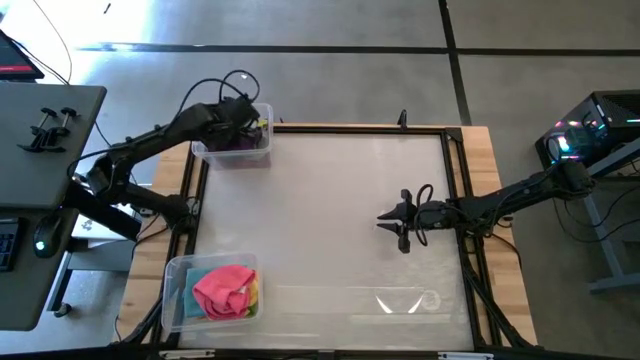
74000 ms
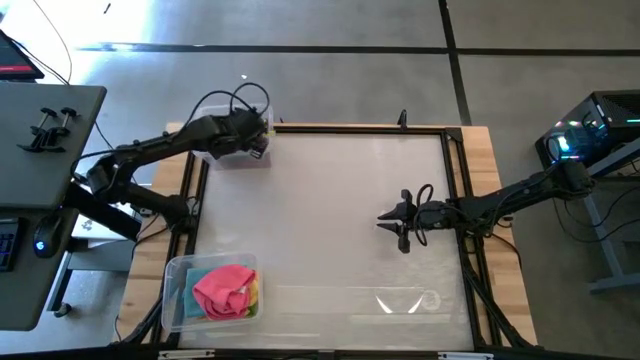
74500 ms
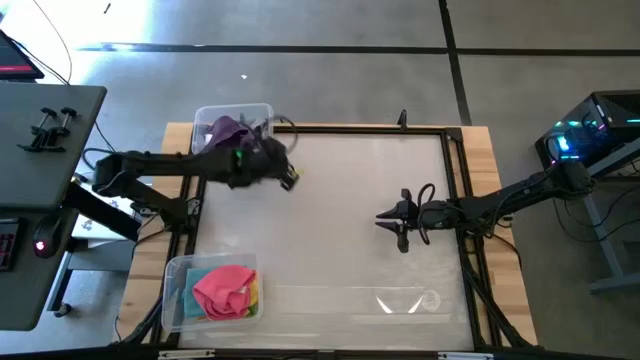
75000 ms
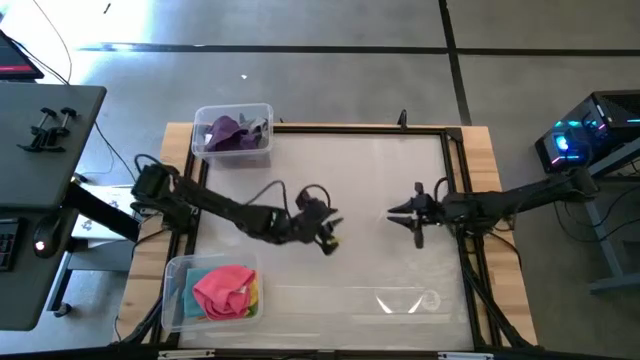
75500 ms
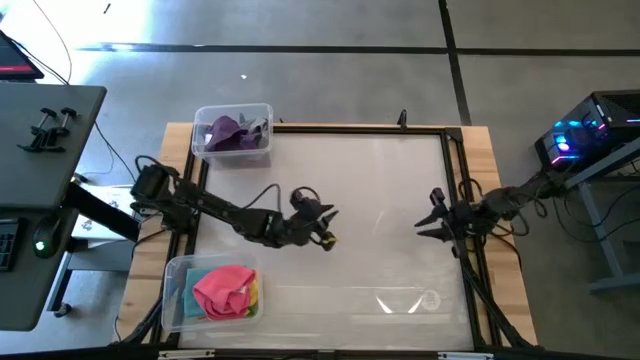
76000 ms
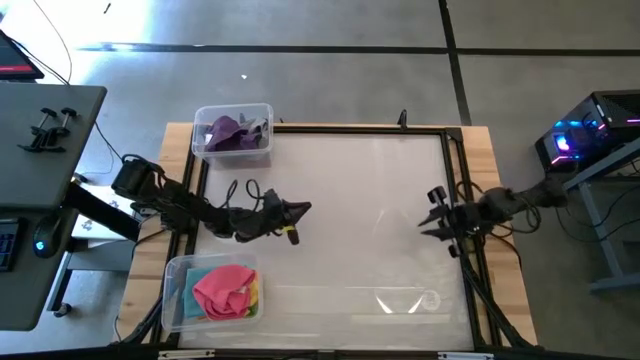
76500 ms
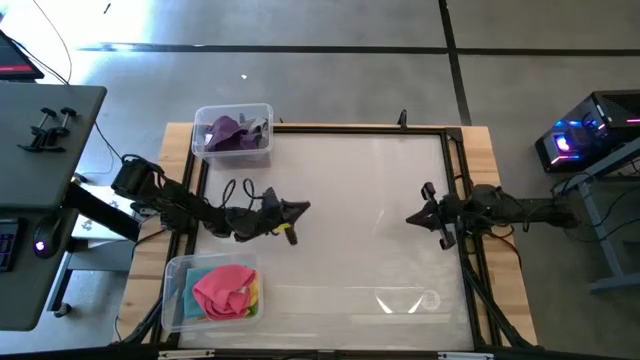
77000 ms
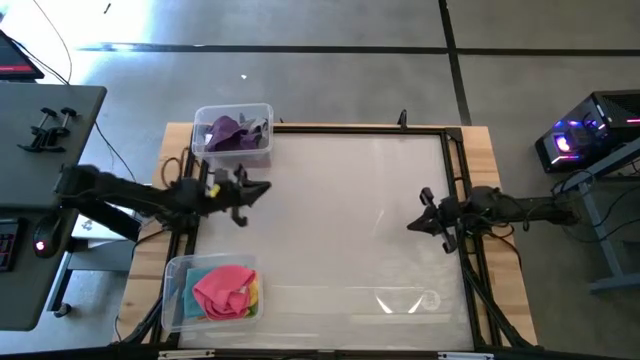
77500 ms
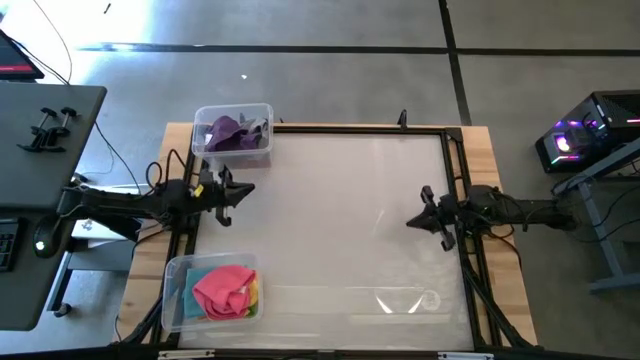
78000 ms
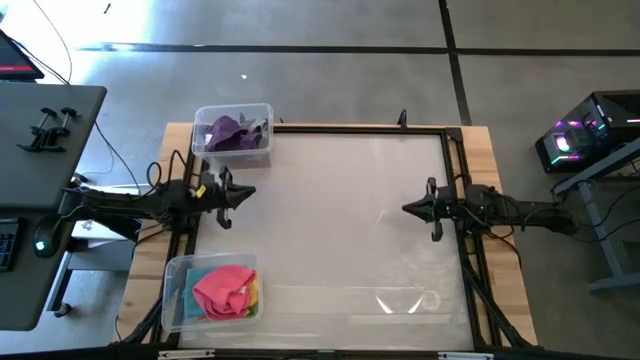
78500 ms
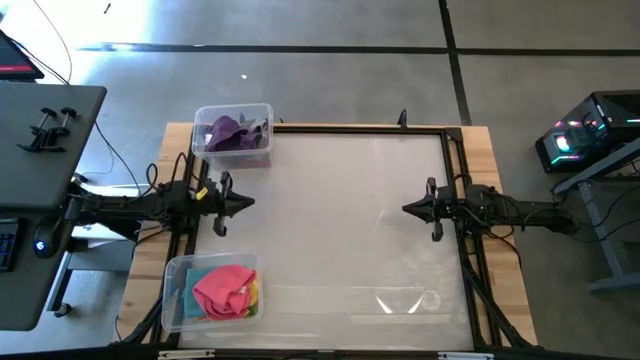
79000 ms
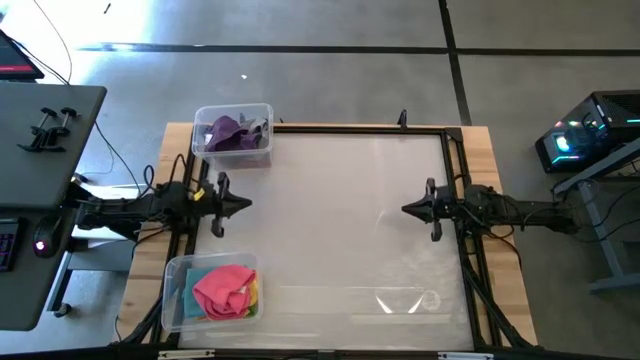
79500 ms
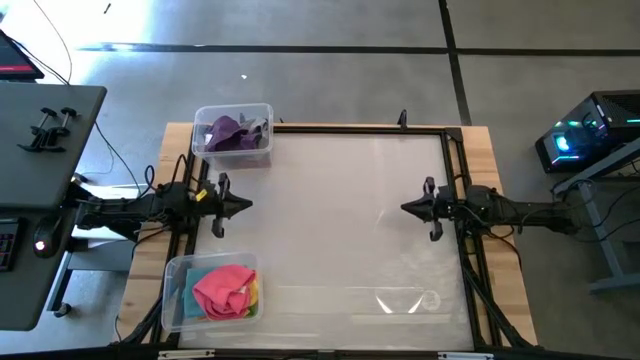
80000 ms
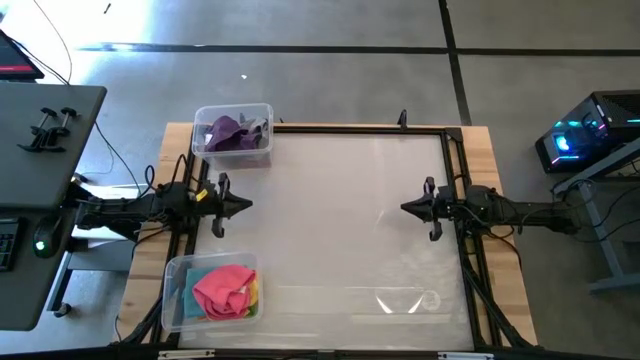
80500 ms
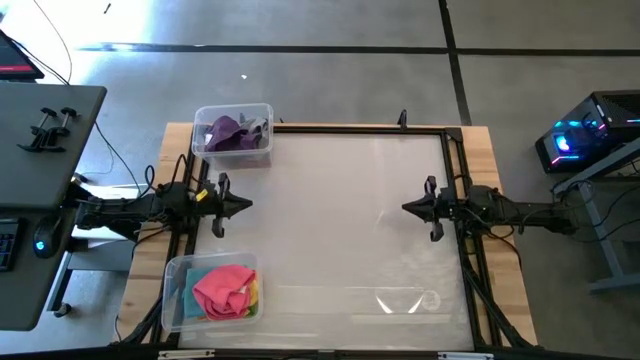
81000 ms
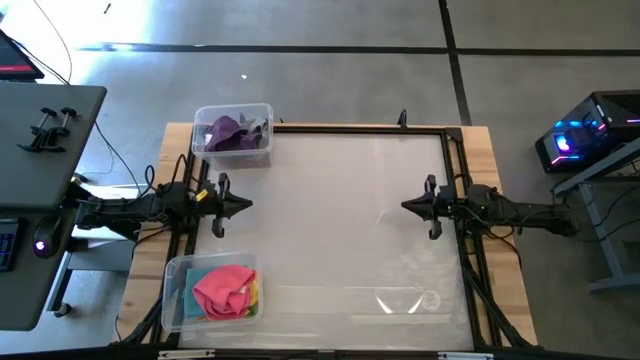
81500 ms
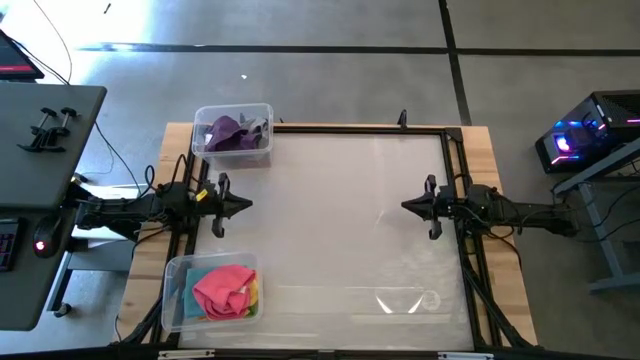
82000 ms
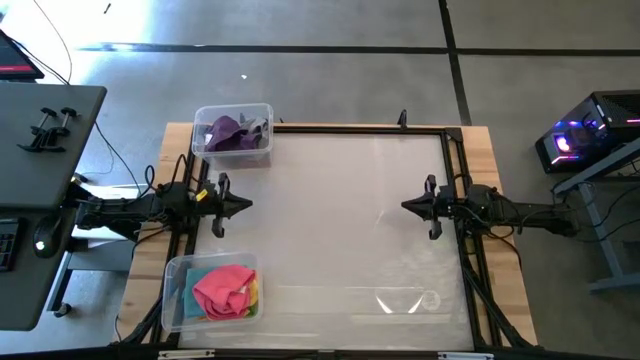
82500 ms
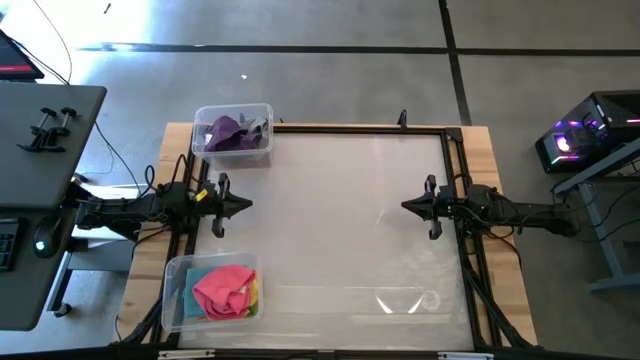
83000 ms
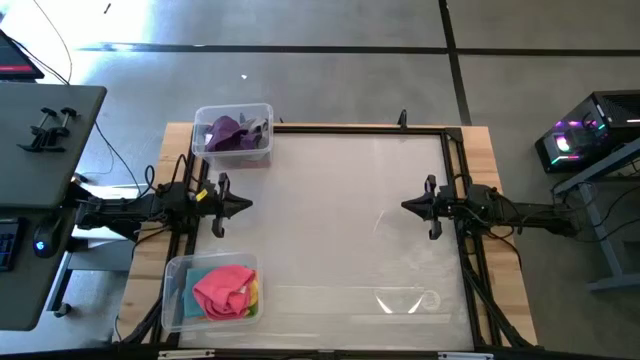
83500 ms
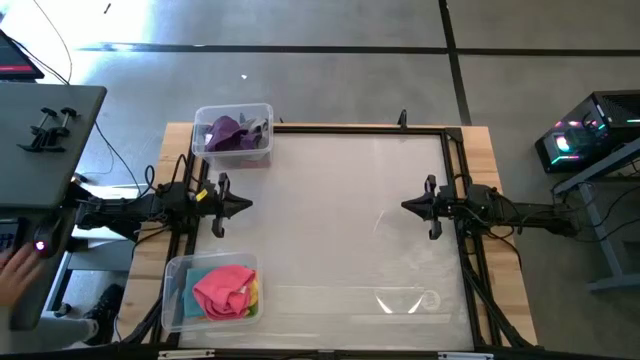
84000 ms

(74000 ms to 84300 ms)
Task: Sort towels by color in basket
Return to Home Position

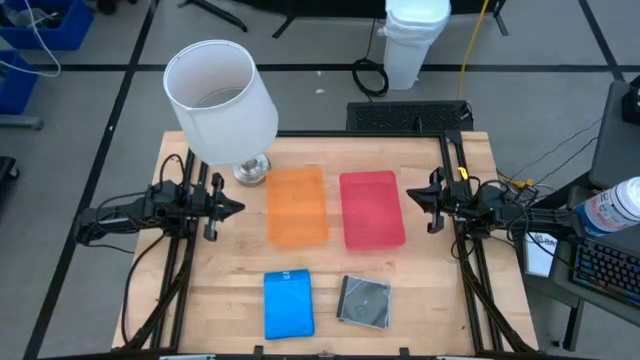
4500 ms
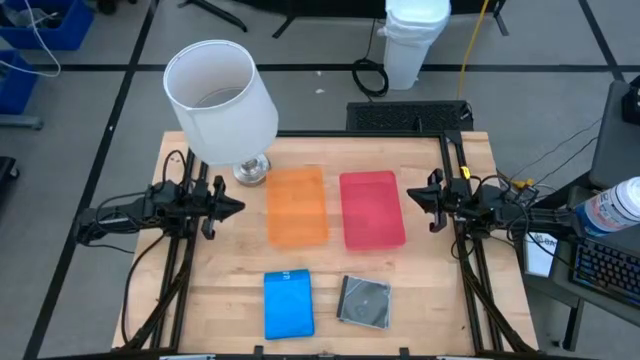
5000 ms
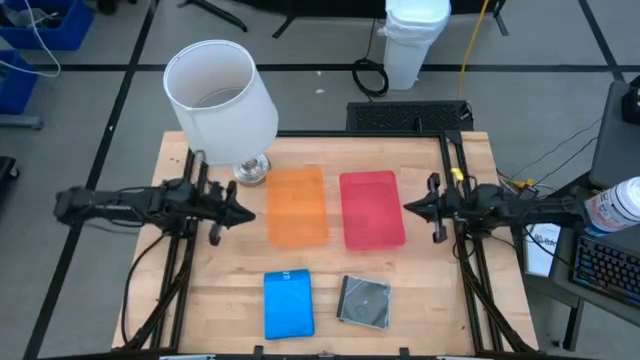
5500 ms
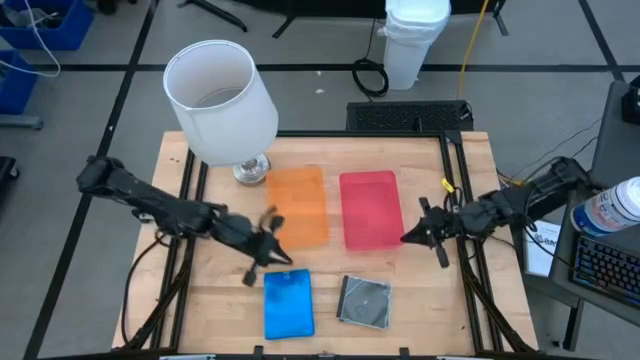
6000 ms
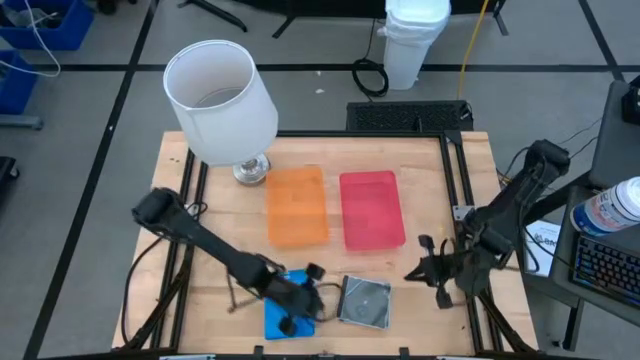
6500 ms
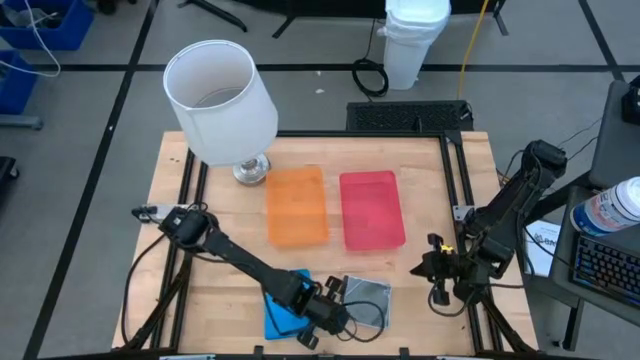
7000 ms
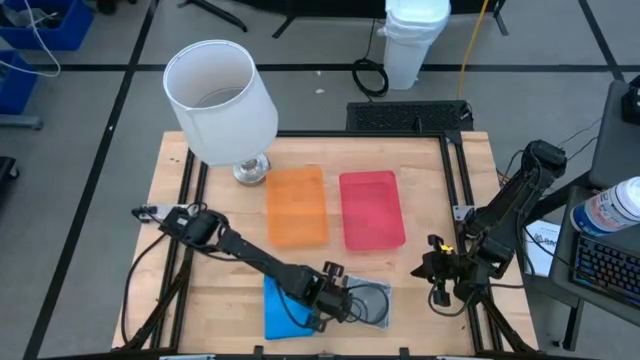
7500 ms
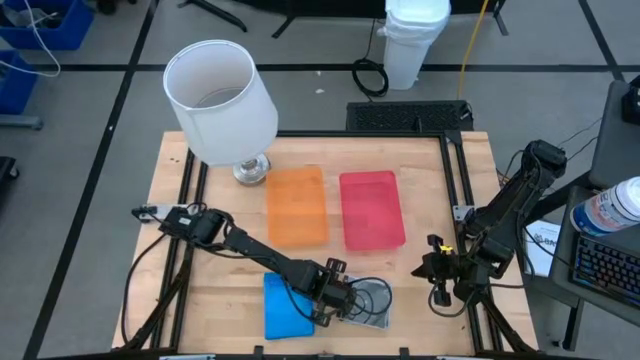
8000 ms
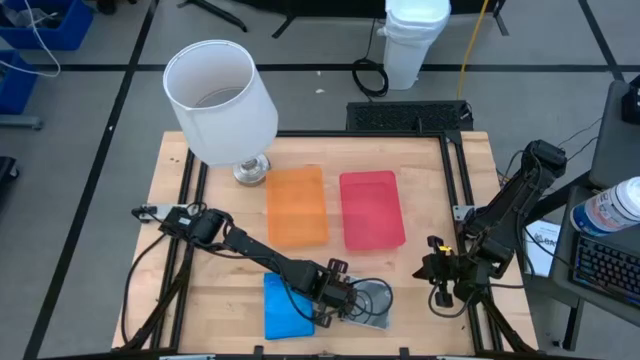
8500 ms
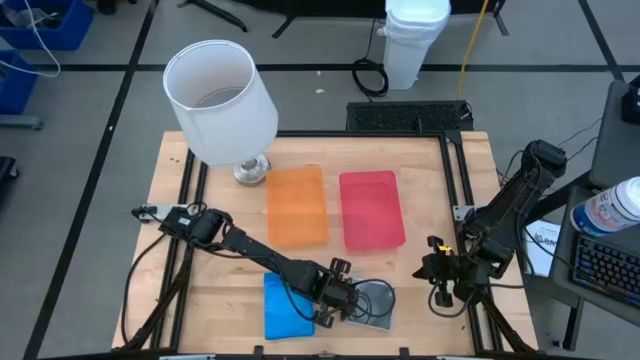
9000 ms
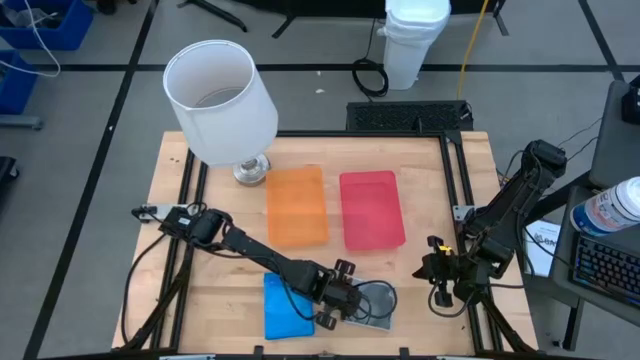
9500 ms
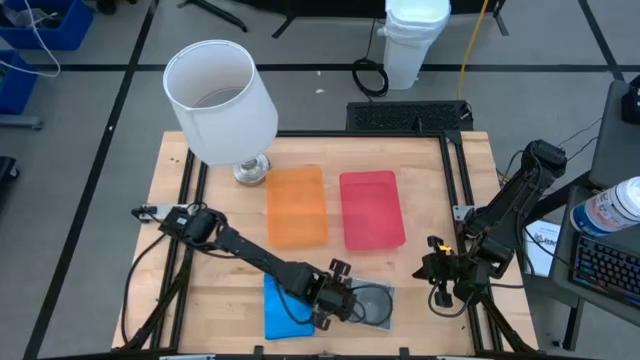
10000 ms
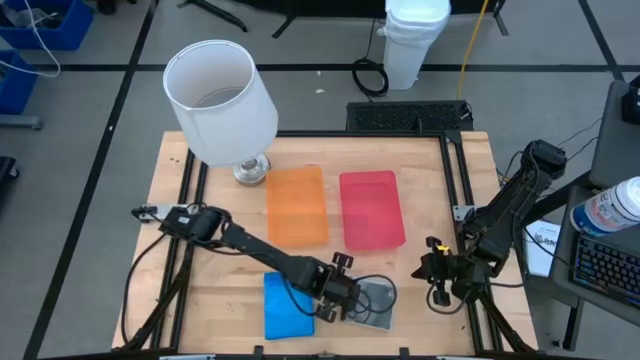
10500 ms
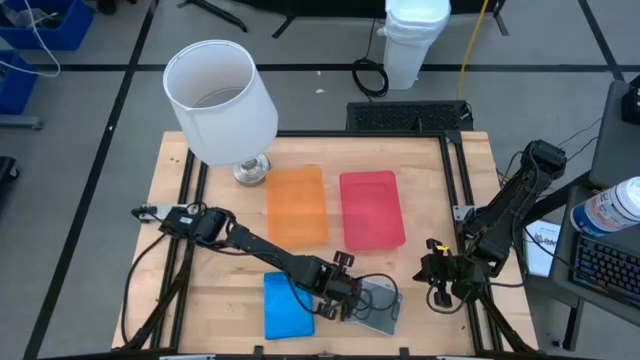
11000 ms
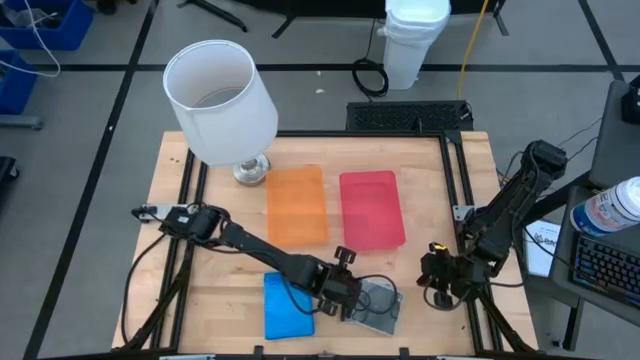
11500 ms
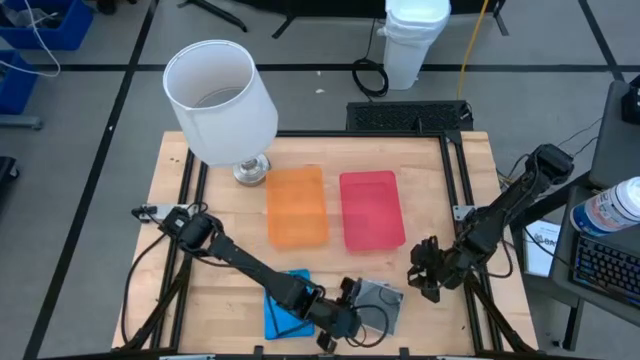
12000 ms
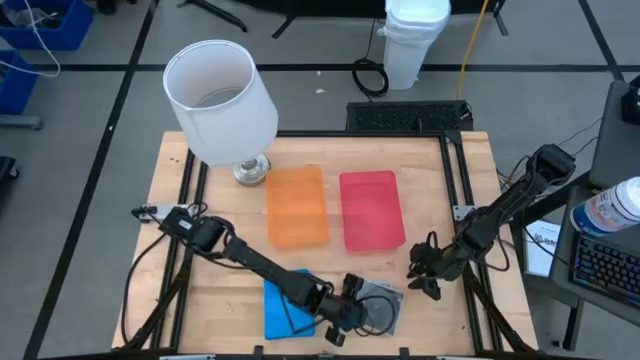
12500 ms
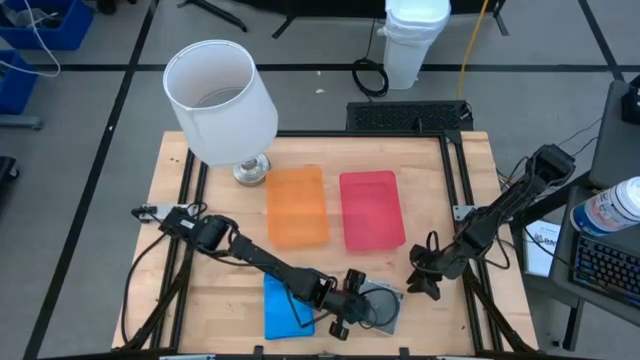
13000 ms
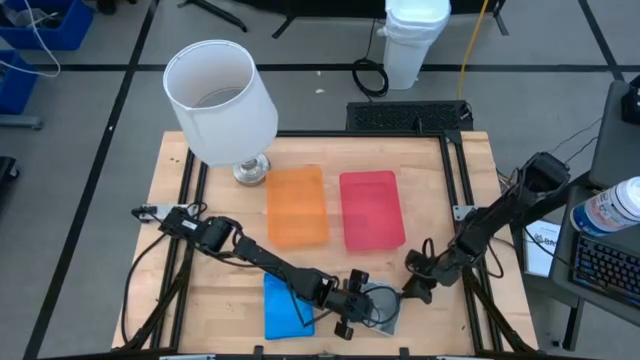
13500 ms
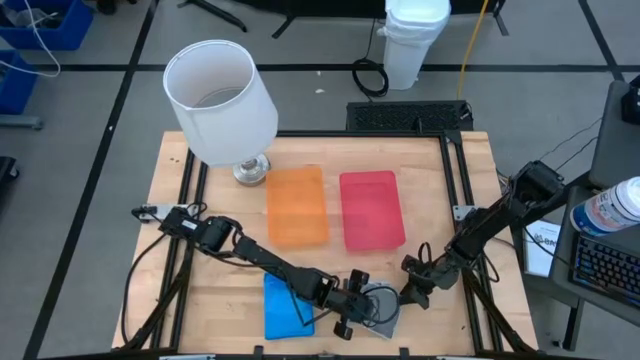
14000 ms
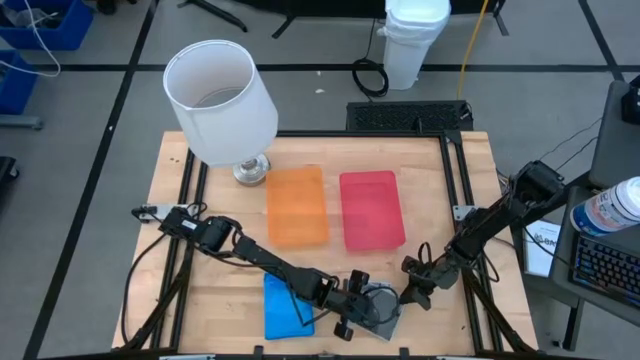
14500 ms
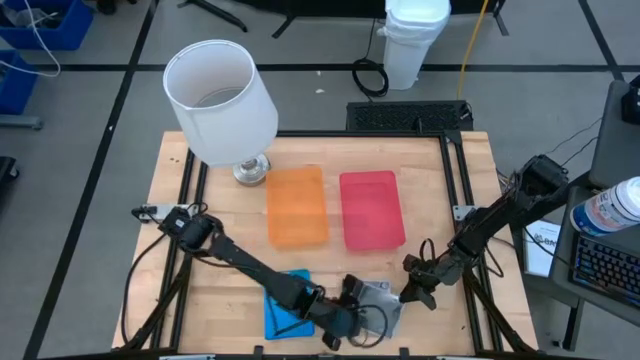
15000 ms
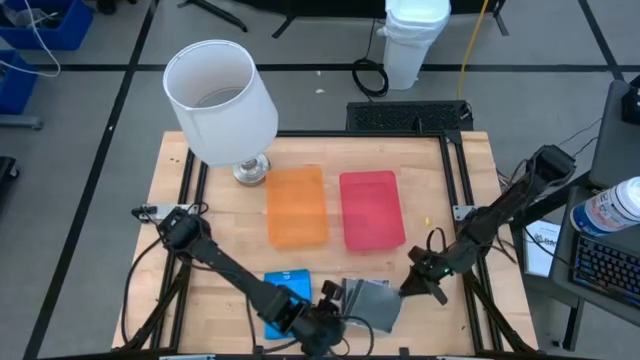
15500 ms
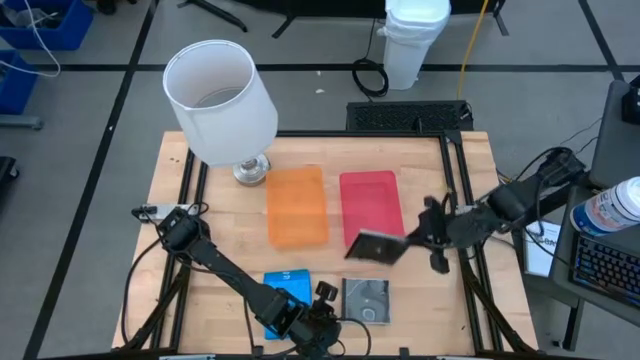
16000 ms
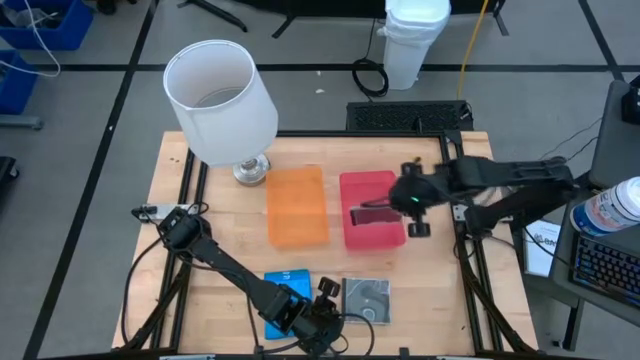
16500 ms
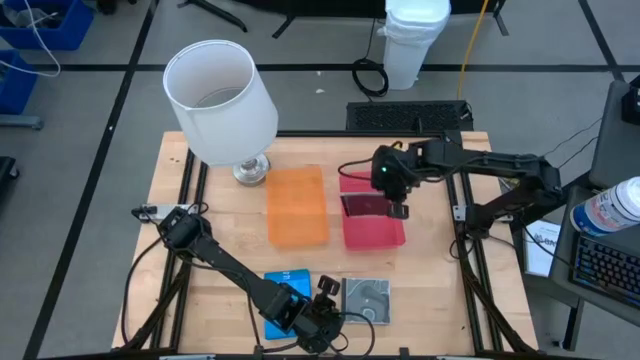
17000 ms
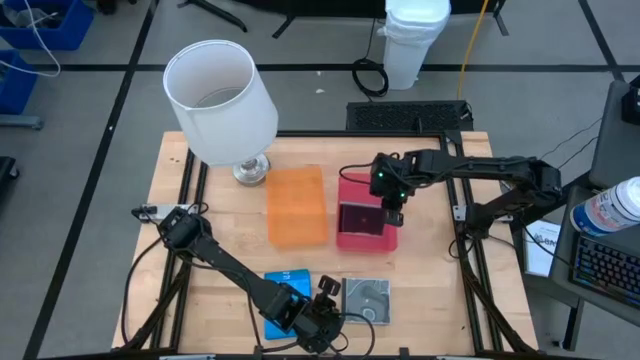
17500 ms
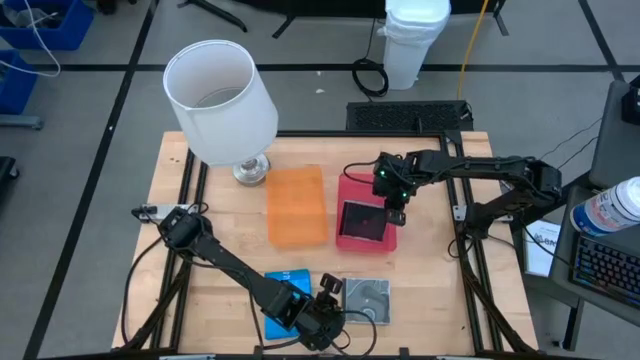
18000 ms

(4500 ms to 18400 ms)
Task: Pick & place jewel cases by type
Put the black CD case into the pink bin
